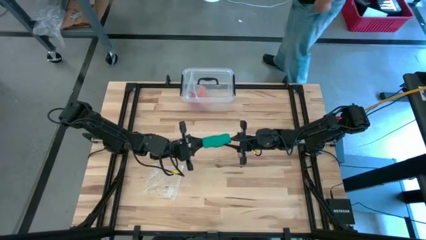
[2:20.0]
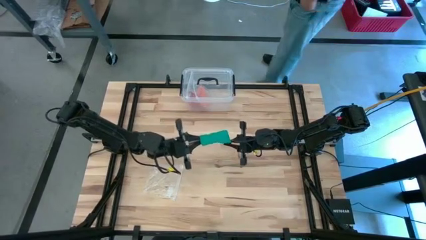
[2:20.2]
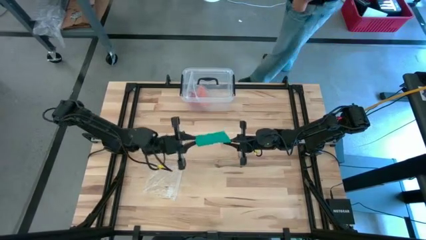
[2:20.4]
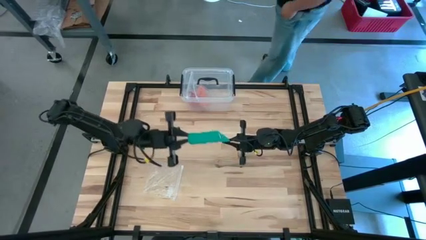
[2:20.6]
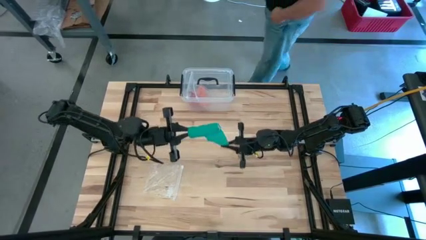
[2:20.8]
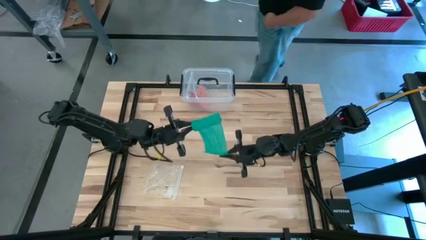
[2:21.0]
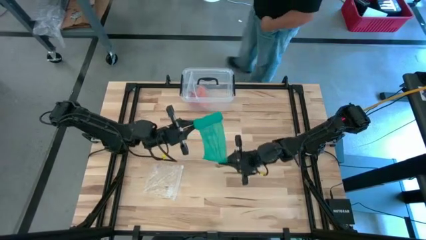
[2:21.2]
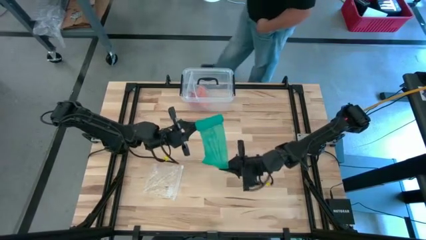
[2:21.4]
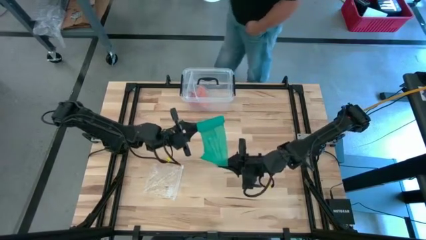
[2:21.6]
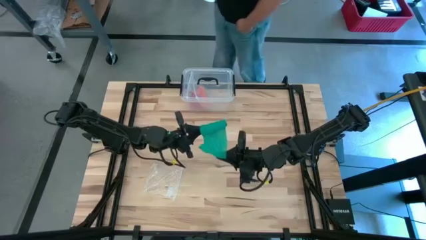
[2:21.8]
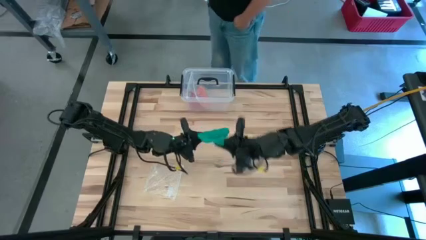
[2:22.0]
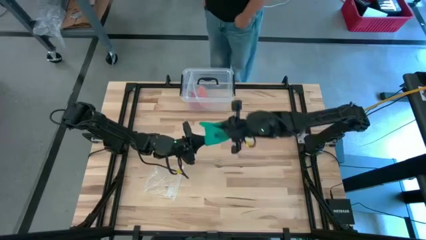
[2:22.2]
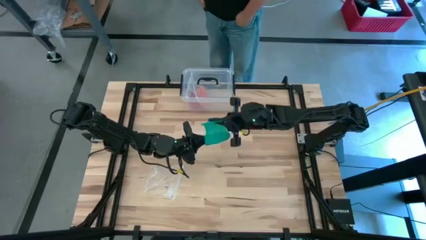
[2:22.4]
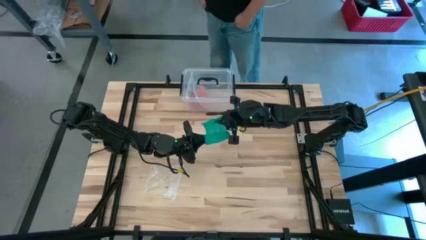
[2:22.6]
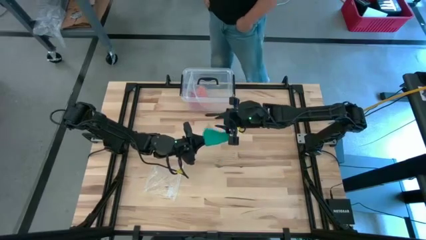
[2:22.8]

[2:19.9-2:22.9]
Task: Roll bandage
Roll the green bandage

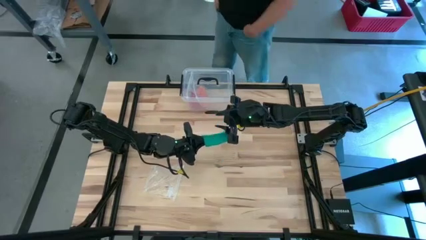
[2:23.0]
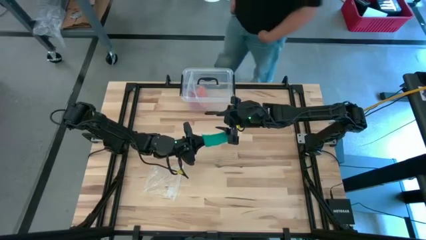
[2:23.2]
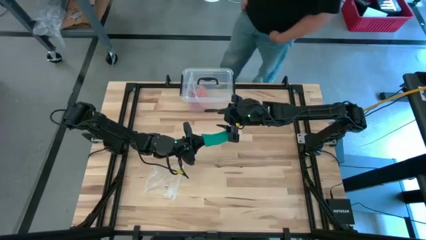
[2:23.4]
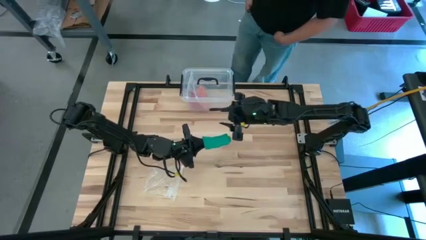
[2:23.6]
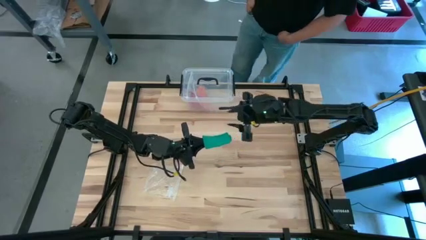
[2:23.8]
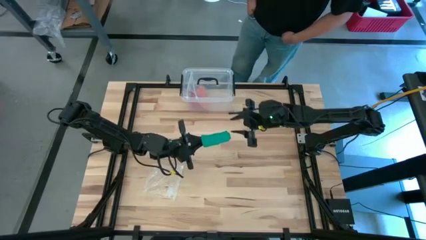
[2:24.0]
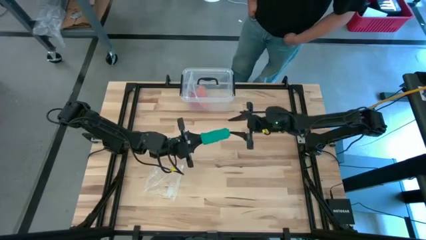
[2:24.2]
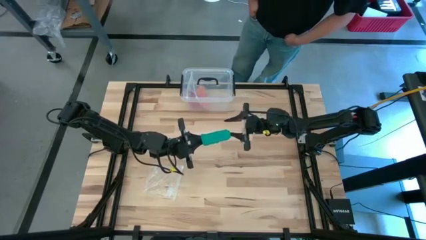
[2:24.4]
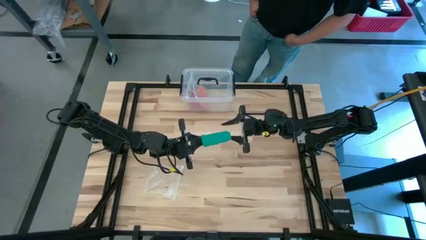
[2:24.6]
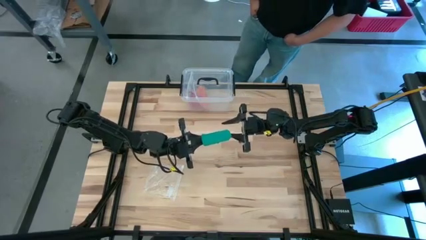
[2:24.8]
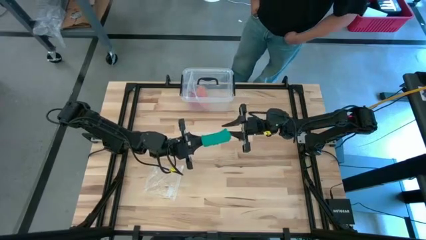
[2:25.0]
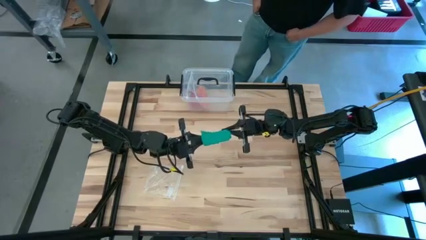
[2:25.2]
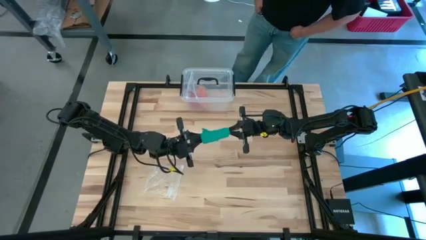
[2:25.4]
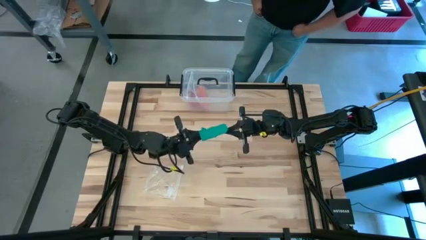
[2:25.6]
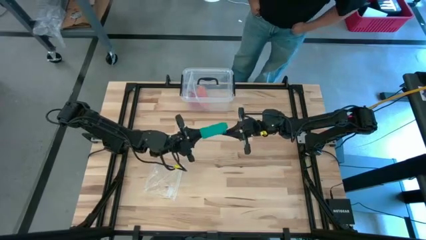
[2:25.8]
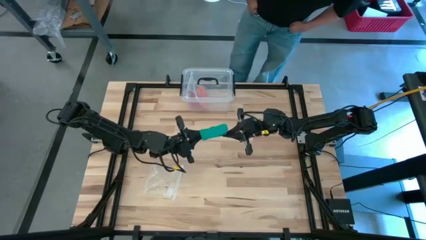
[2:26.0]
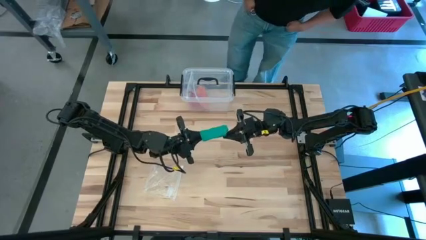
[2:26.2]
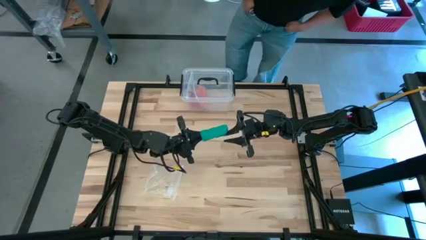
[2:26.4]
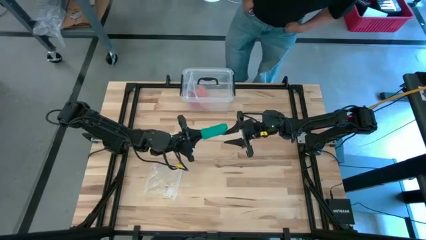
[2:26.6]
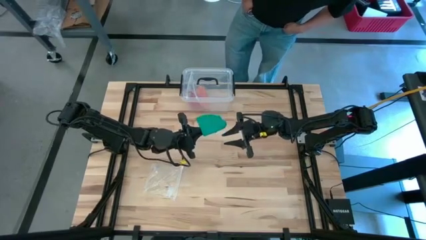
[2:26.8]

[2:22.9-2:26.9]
Roll the green bandage

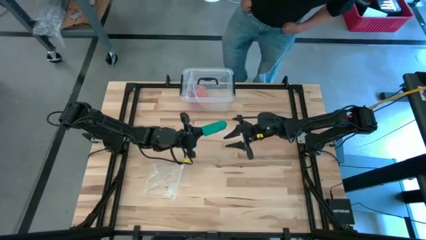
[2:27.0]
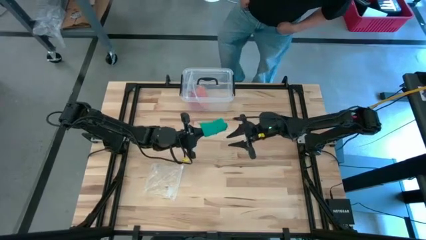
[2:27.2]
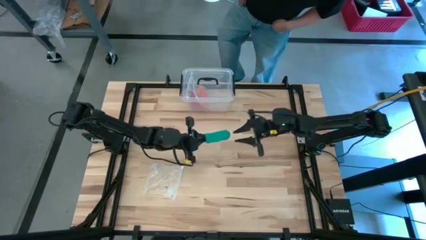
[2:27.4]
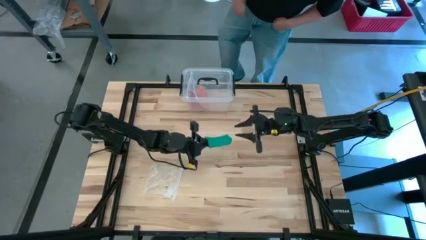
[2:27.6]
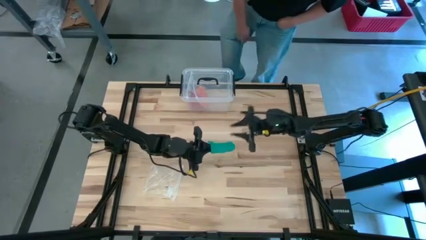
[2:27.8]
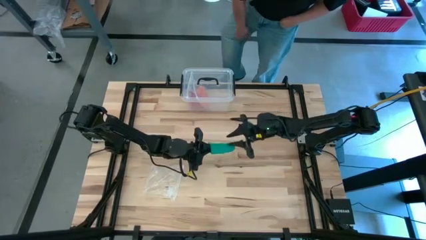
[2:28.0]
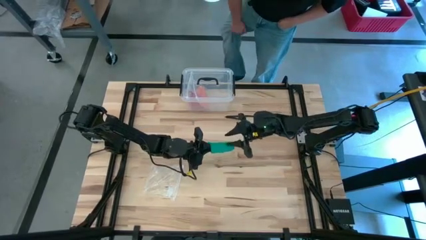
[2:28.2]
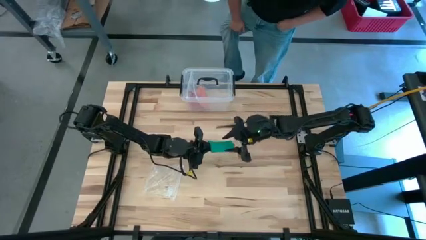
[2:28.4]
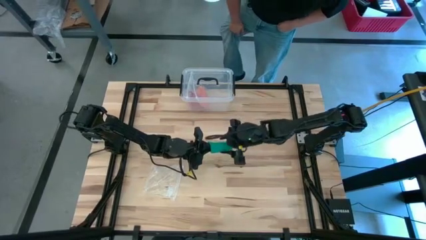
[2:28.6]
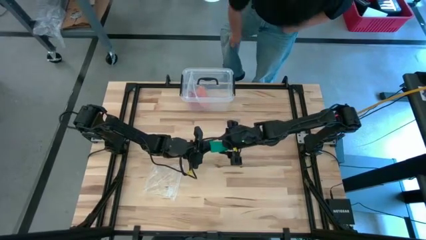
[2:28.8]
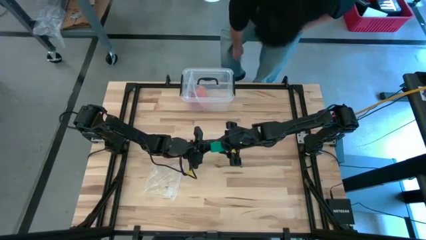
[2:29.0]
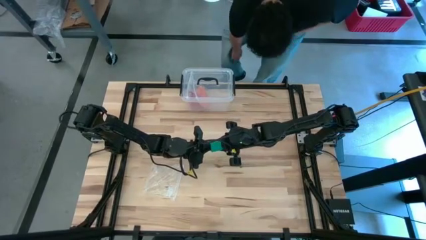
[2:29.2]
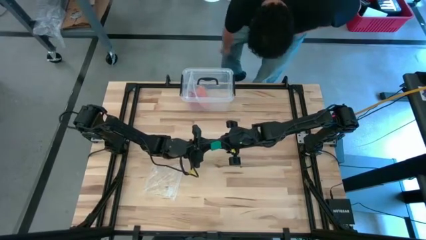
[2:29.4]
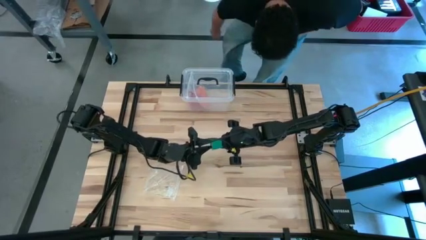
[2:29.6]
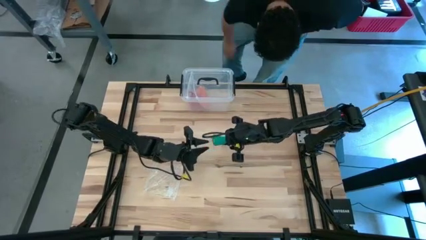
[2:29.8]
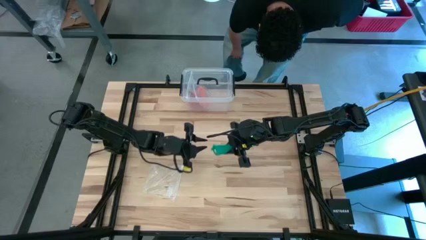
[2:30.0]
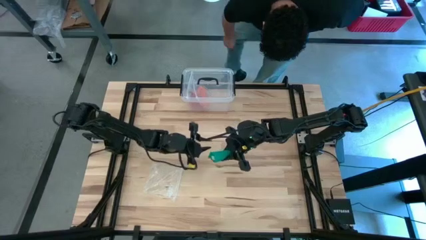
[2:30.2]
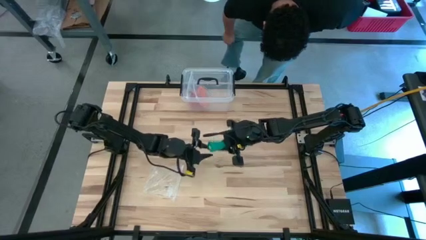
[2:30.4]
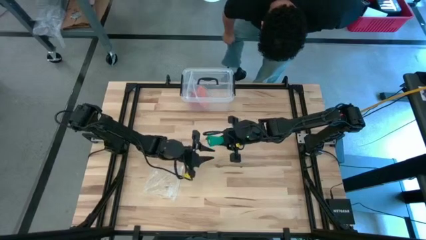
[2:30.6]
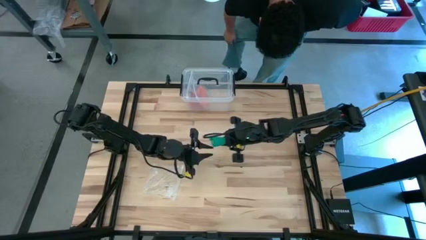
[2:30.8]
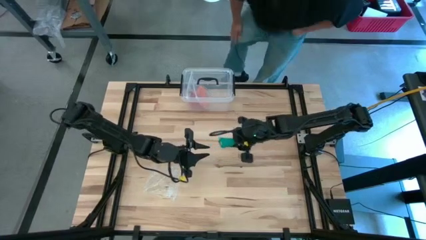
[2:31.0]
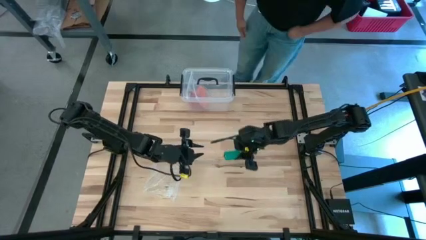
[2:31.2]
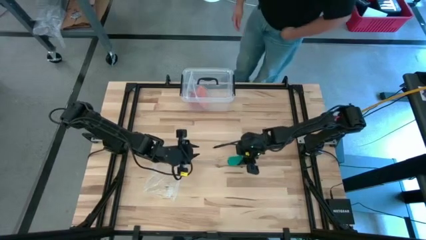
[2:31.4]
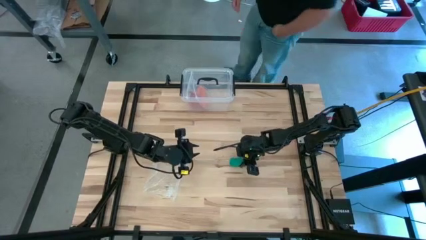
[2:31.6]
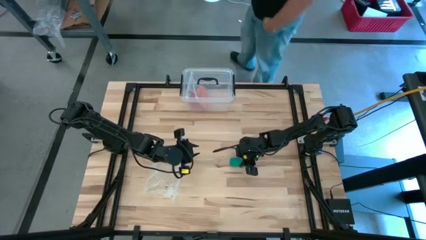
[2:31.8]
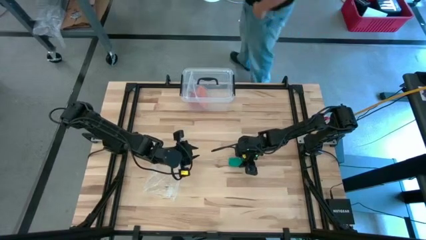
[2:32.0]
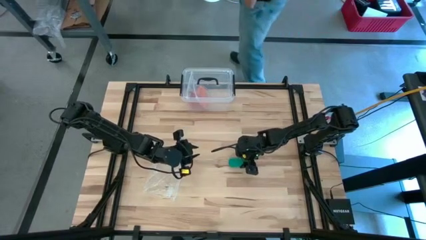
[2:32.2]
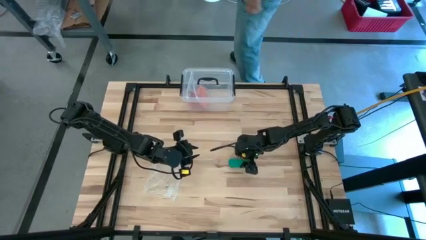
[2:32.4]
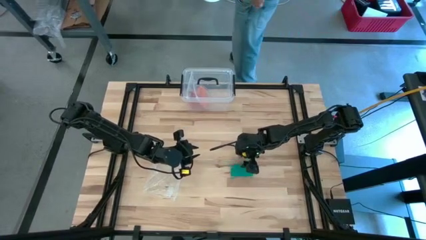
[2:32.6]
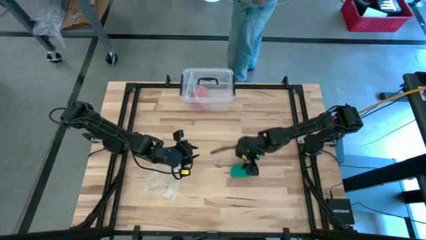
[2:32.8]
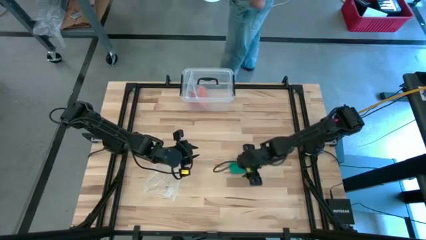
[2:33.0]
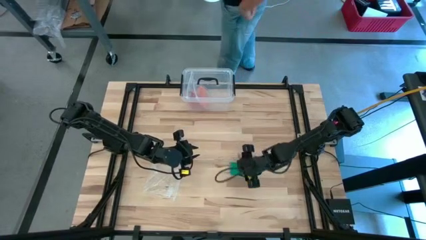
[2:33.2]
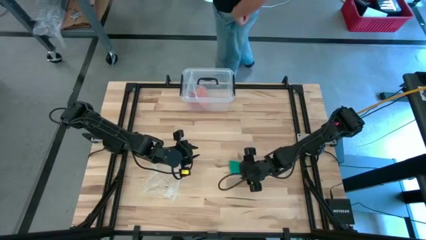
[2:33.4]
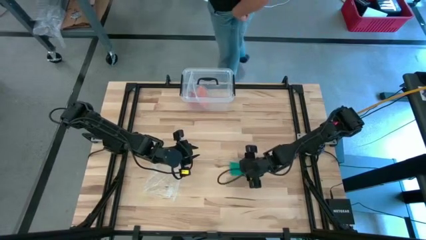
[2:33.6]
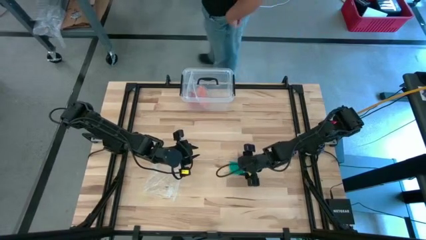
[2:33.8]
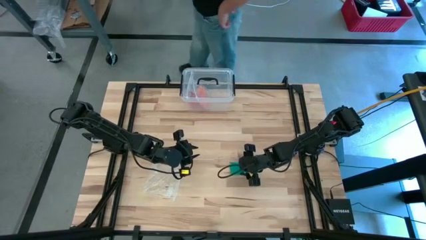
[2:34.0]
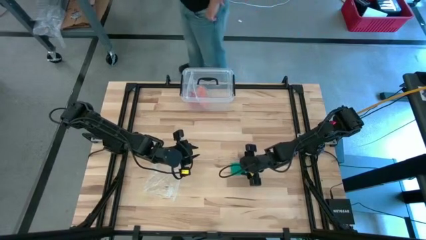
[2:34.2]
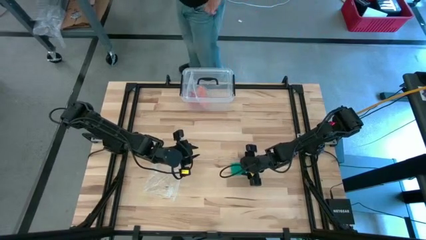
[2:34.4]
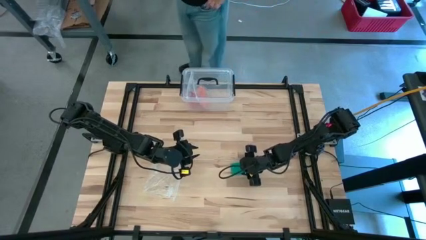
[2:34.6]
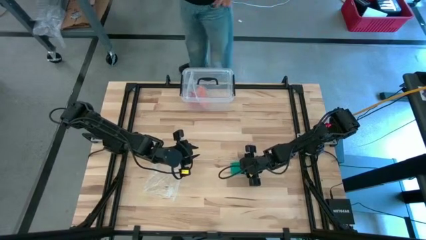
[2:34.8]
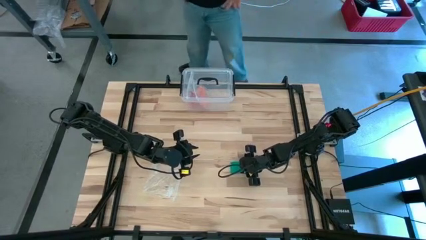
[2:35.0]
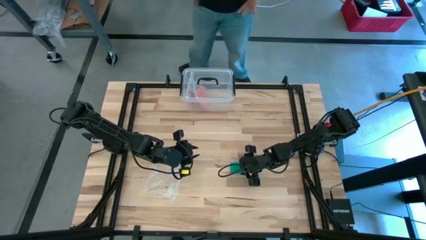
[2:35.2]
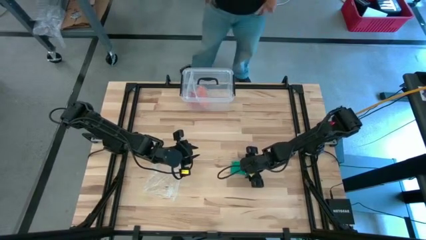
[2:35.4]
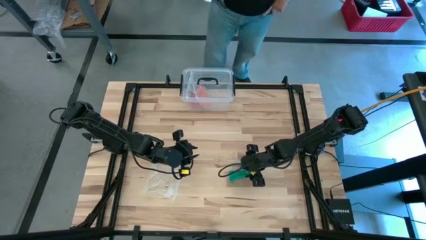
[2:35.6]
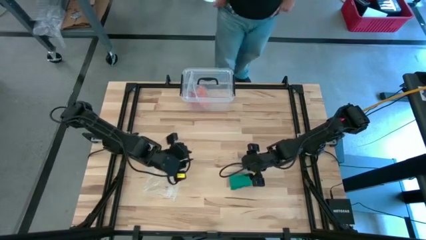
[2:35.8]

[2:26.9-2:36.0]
Roll the green bandage
